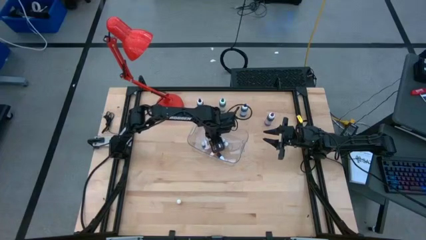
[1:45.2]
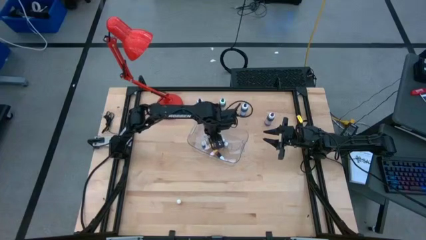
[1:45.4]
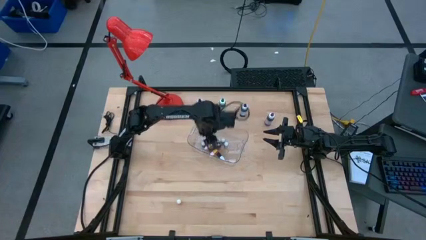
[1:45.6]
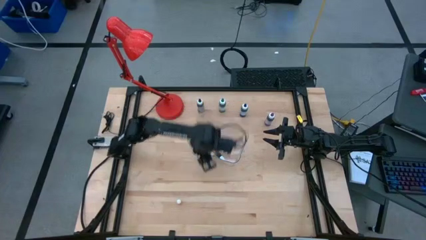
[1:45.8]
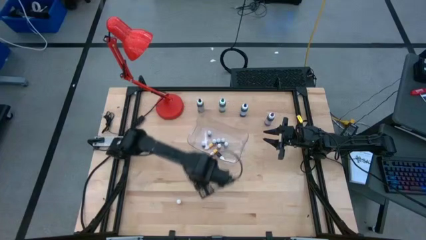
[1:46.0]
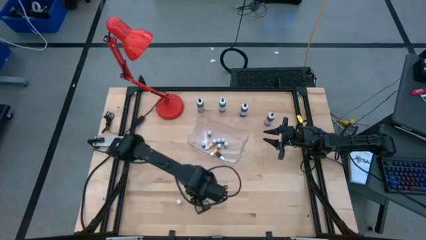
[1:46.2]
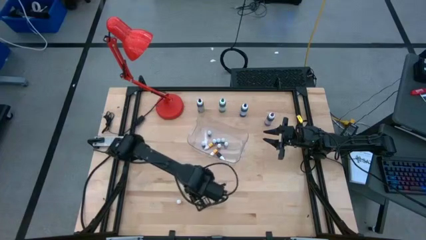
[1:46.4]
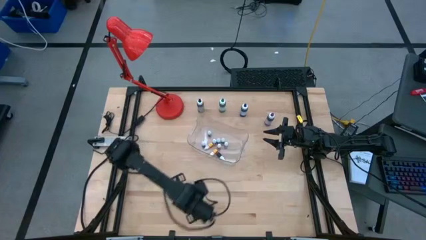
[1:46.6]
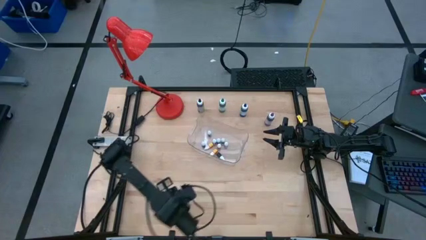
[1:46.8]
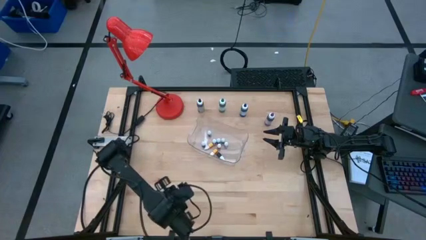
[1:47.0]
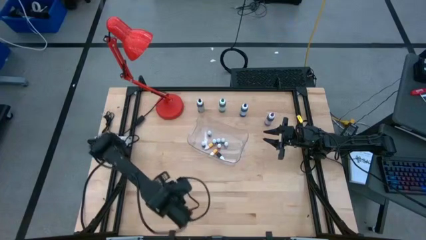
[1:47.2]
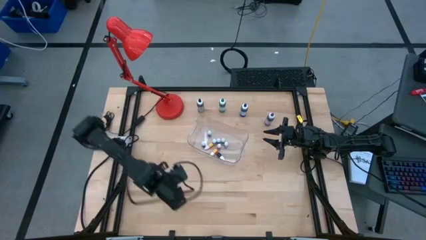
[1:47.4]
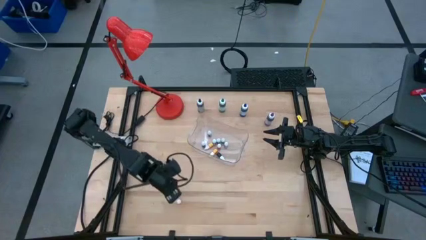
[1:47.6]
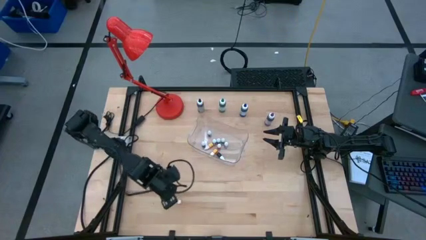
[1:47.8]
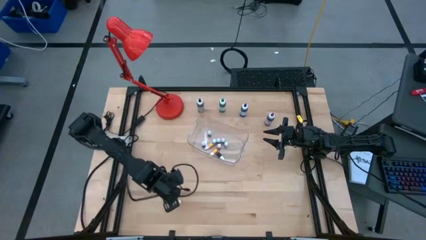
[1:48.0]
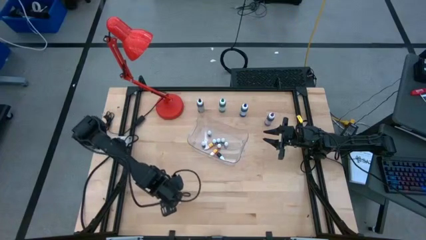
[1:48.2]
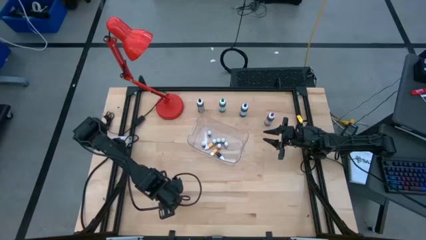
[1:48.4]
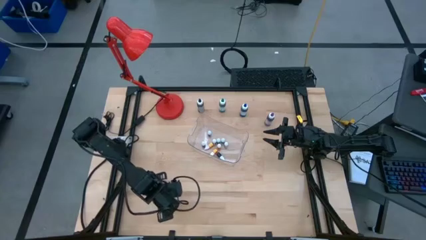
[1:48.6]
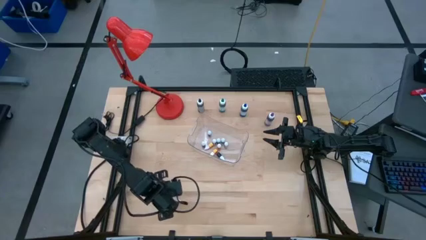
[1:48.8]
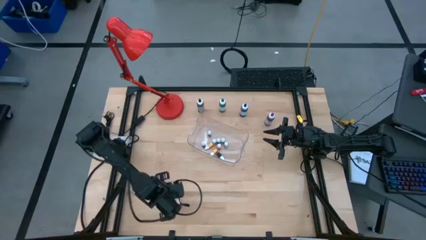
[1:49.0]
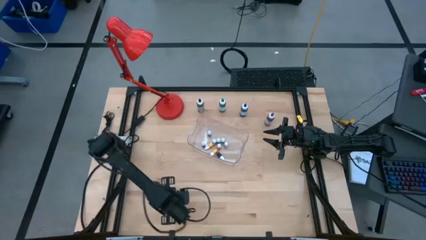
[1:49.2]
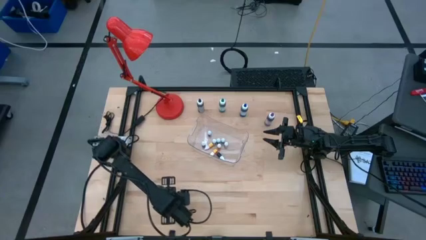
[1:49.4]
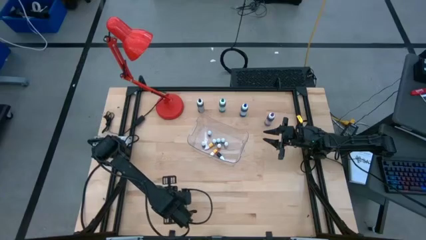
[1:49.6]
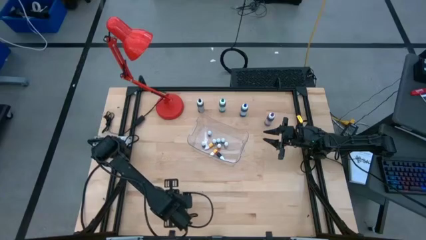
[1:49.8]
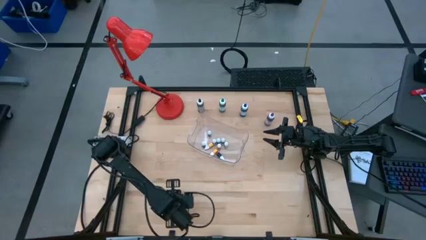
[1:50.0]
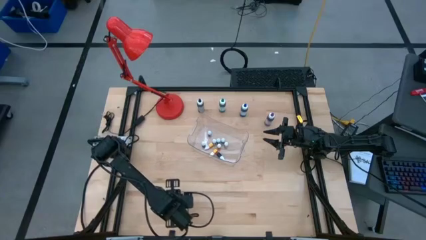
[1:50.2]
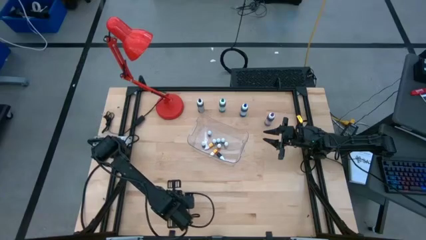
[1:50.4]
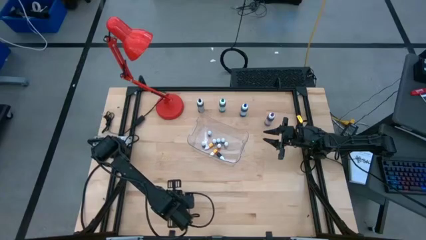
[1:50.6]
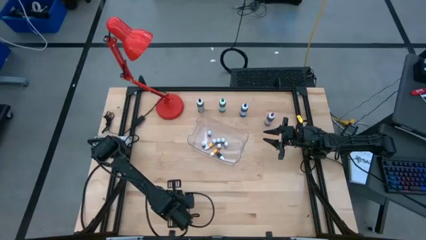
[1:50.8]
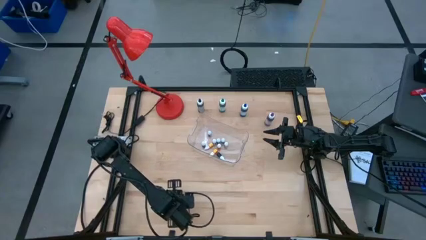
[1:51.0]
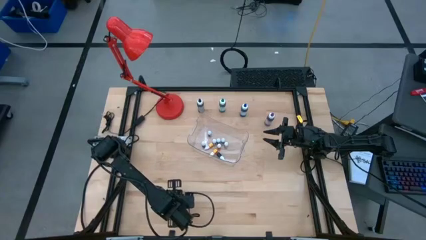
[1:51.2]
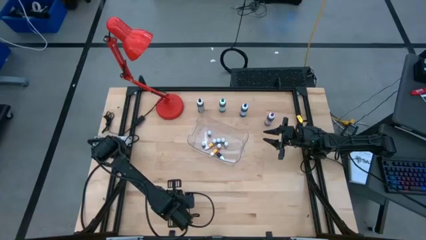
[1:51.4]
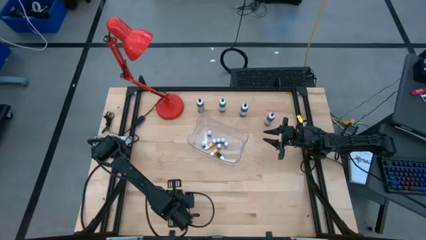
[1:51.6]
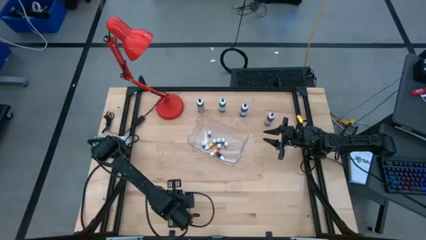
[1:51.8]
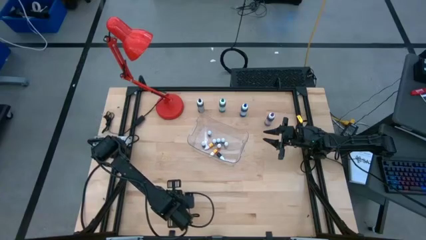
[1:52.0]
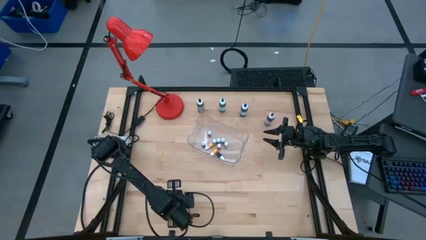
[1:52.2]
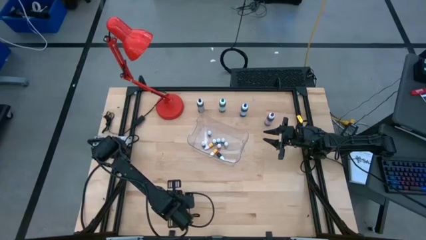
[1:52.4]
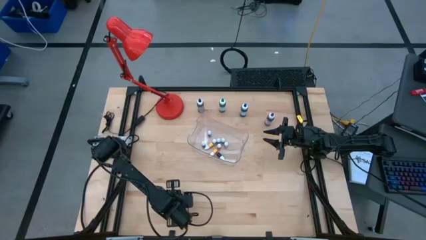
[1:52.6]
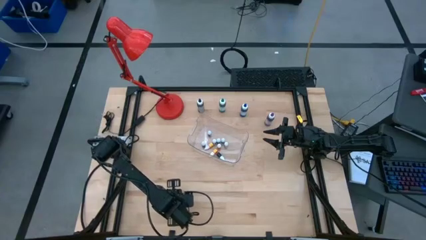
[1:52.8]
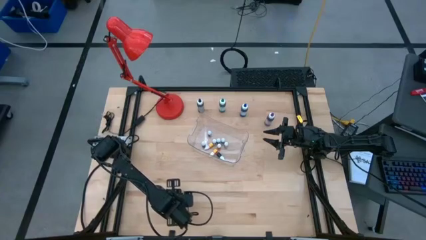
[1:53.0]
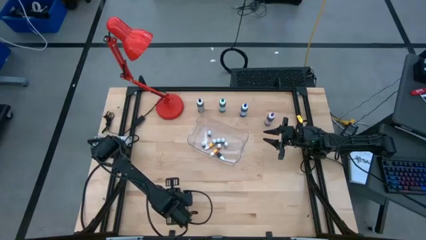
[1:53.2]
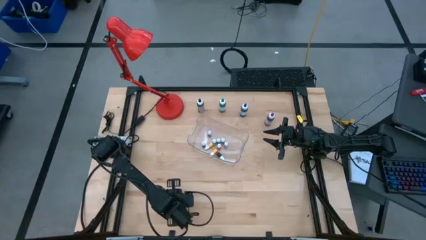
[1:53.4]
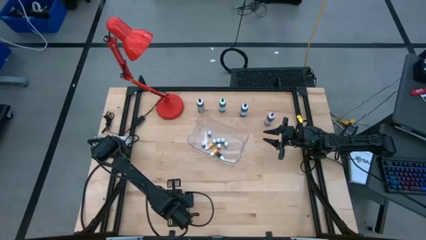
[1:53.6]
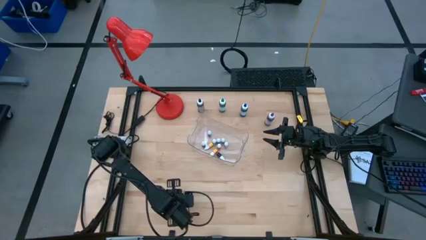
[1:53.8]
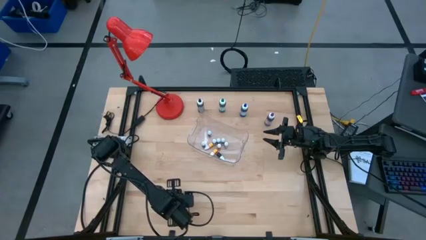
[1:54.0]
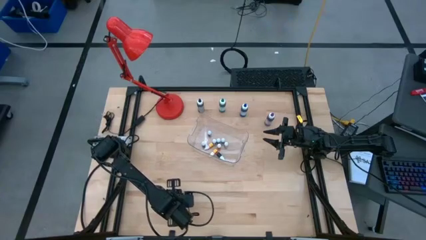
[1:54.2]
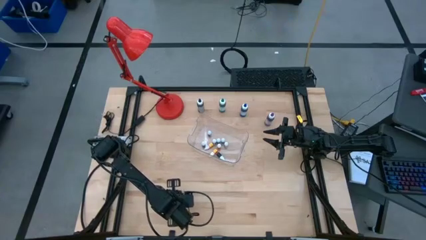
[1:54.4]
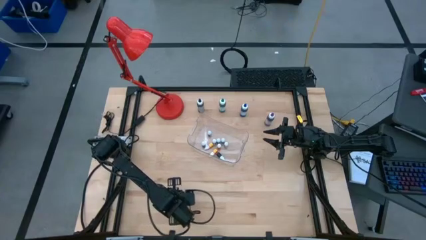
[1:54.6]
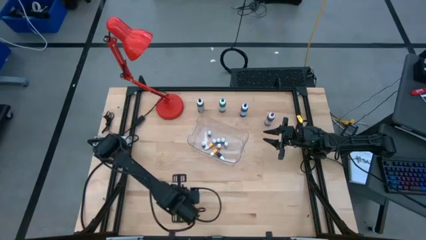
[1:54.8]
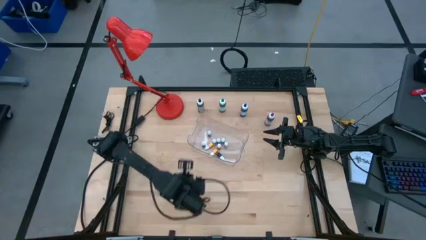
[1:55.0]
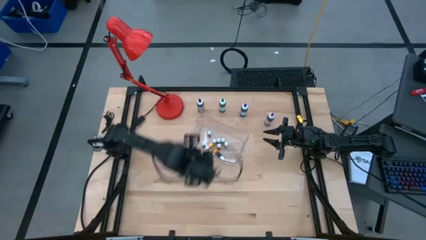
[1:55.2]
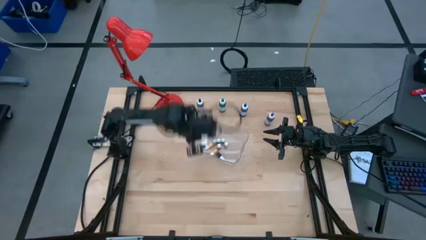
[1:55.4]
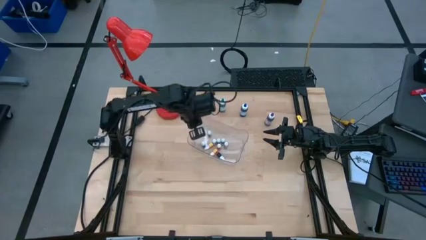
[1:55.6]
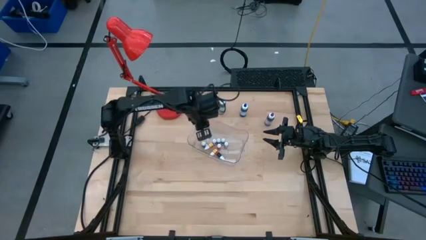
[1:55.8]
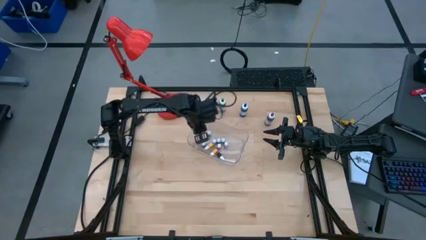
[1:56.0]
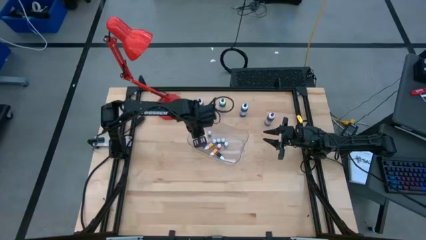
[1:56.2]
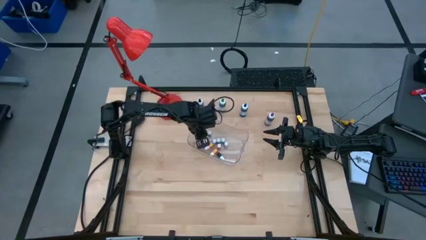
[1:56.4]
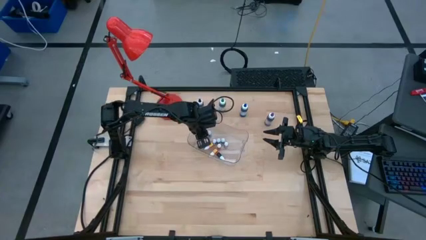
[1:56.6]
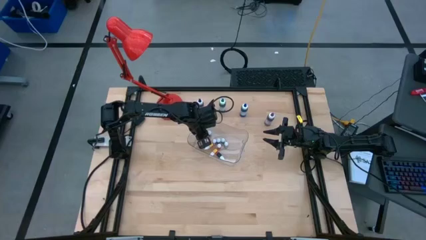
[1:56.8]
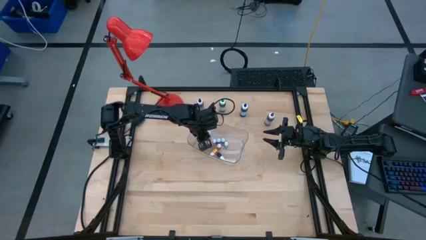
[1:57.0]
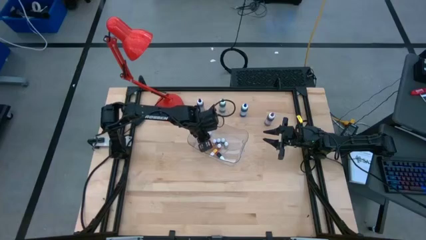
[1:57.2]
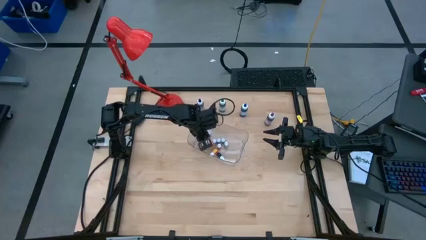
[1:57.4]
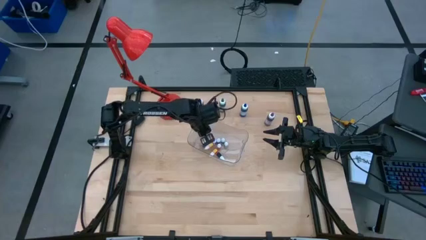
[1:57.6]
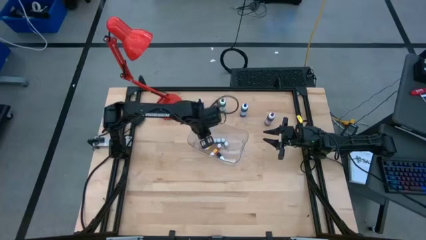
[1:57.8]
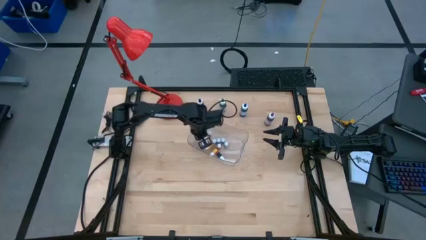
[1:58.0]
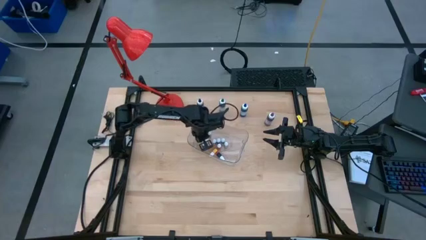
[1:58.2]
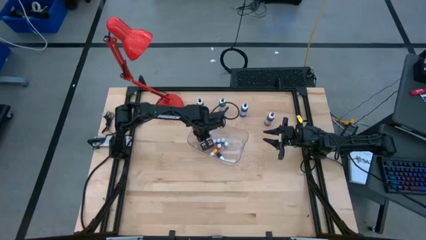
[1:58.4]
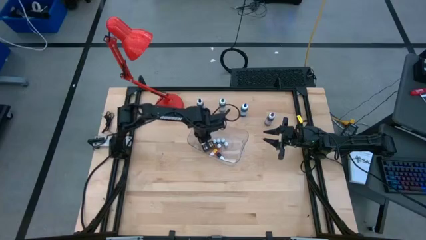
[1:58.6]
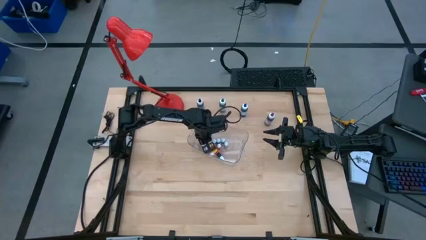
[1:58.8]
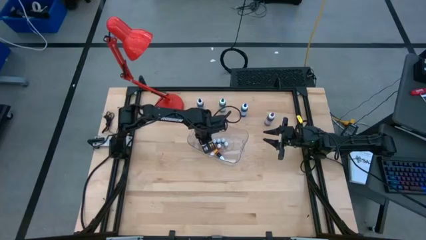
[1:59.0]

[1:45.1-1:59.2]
Task: Pick & Place food coloring
Put the small orange food coloring bottle in the transparent bin

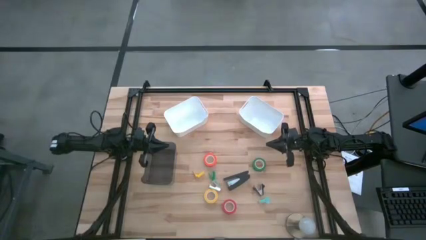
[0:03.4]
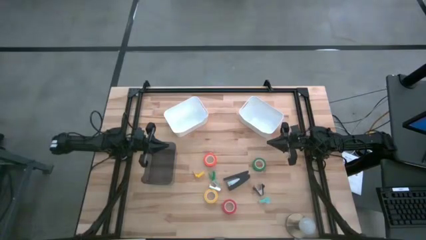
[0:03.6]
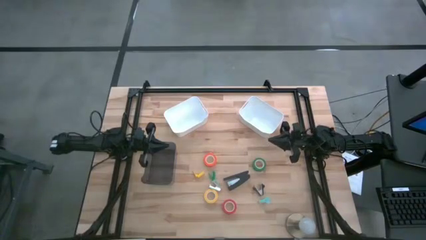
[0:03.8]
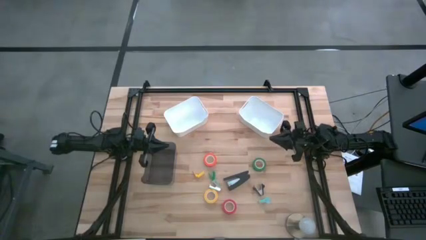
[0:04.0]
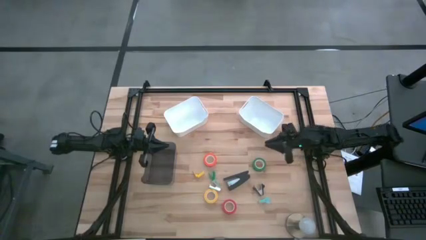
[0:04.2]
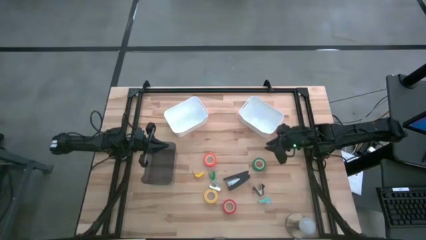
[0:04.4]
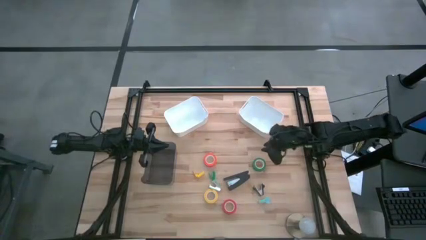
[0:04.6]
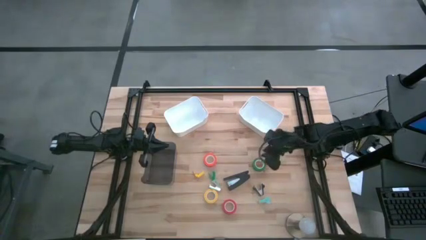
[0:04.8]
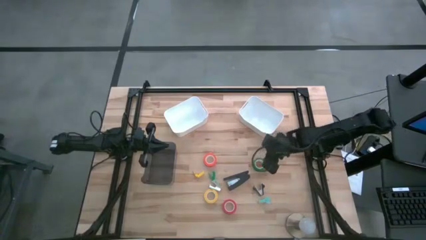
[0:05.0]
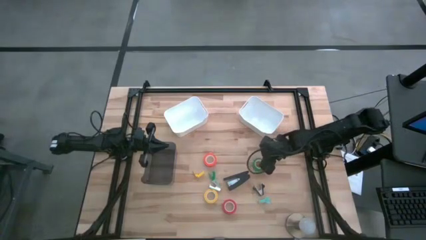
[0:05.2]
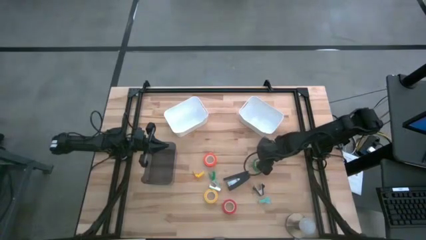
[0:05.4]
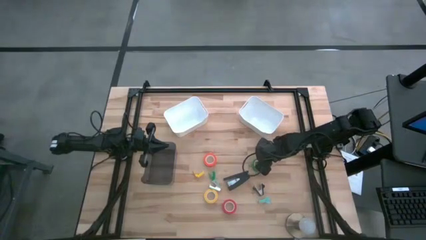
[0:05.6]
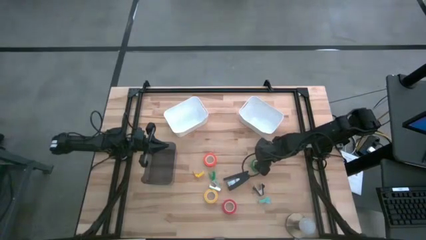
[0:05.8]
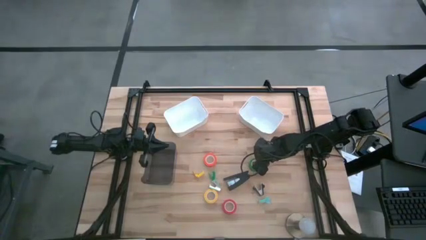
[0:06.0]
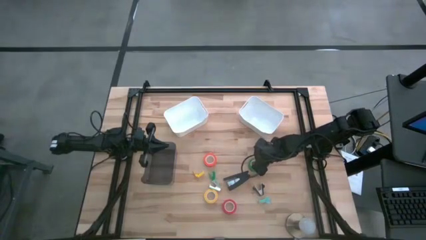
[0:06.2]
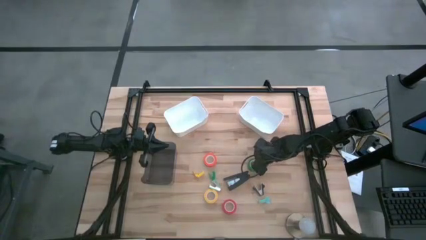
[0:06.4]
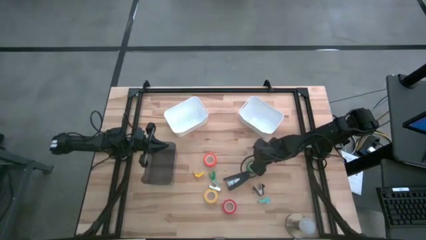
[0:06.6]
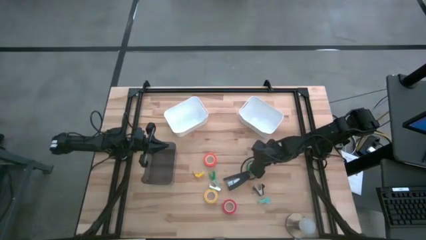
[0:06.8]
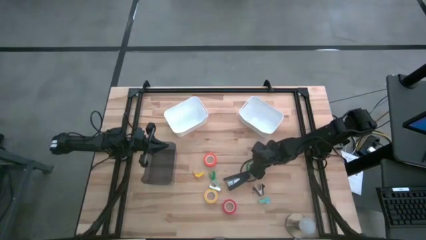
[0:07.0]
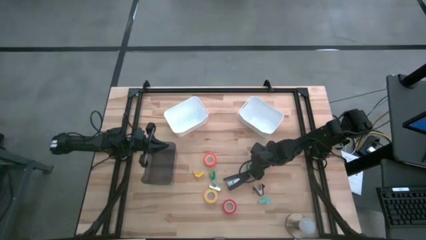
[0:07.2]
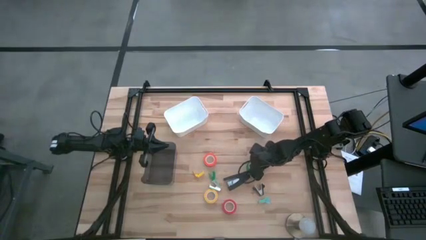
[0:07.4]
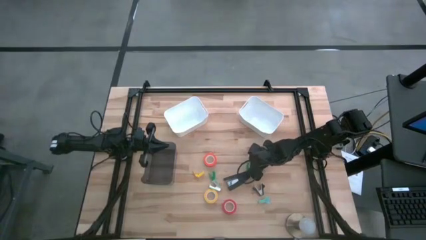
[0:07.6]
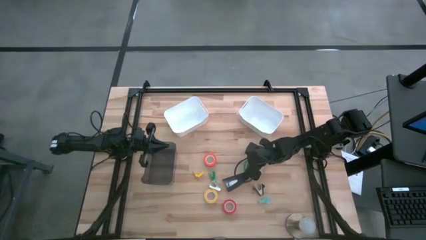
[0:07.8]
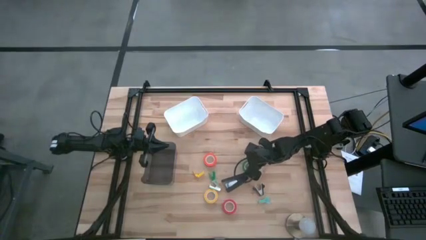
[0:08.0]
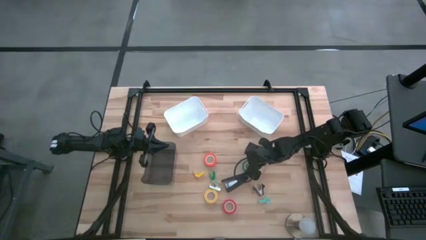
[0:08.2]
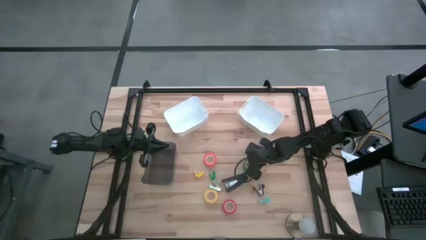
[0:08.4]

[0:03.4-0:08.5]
Task: Pick and place Stapler, Stapler remover, tape
Put the green tape into the right white bin
